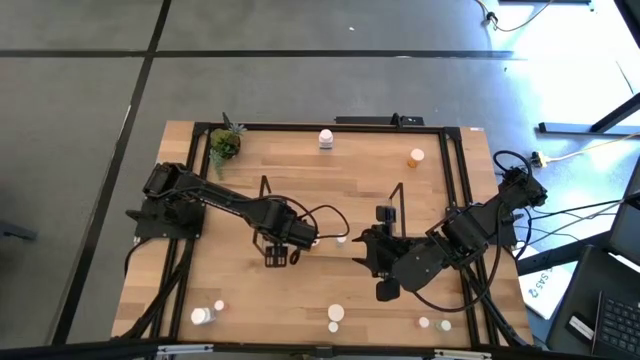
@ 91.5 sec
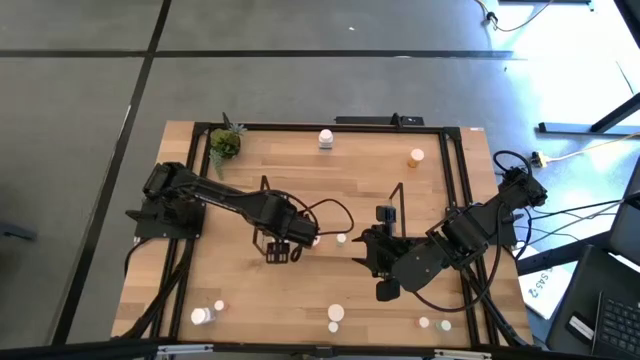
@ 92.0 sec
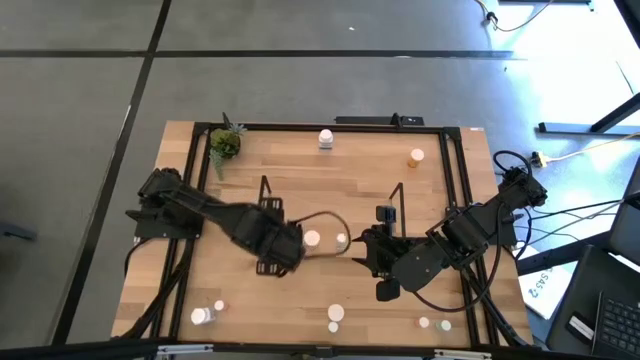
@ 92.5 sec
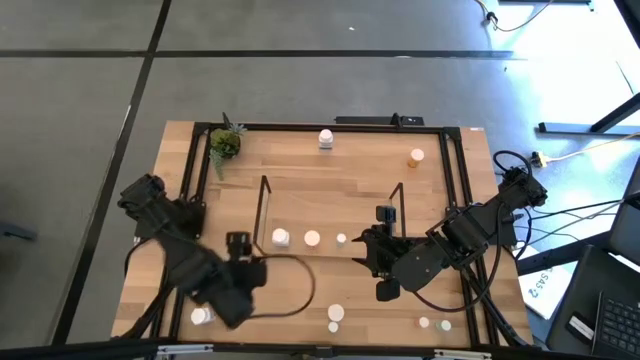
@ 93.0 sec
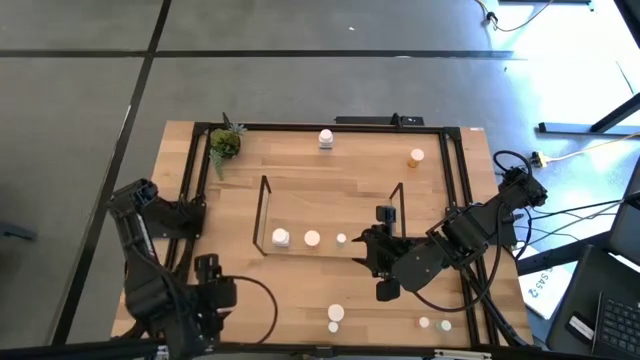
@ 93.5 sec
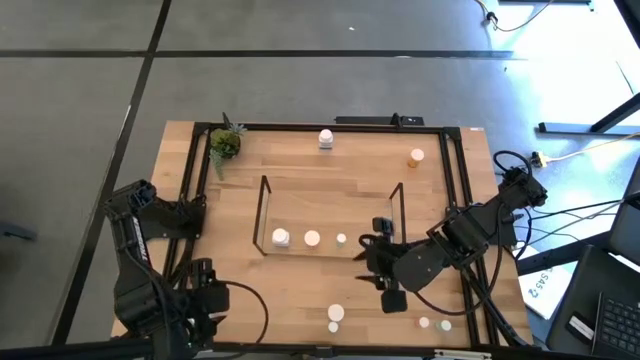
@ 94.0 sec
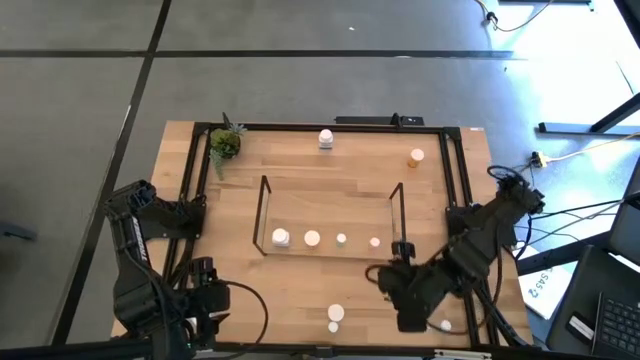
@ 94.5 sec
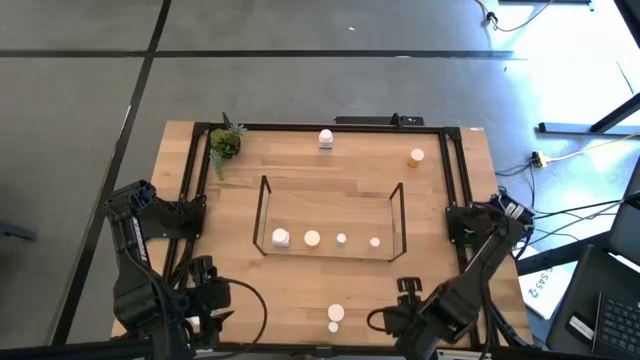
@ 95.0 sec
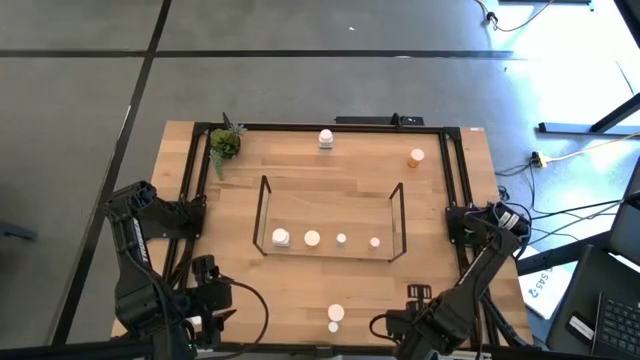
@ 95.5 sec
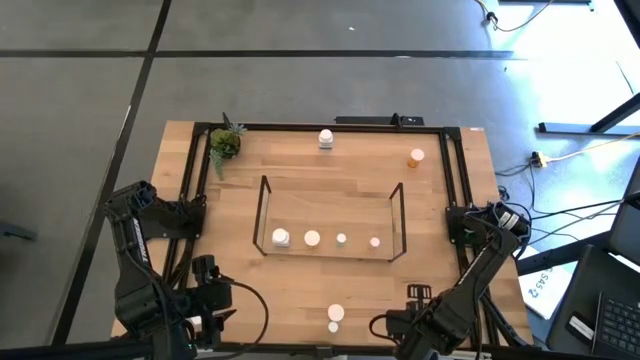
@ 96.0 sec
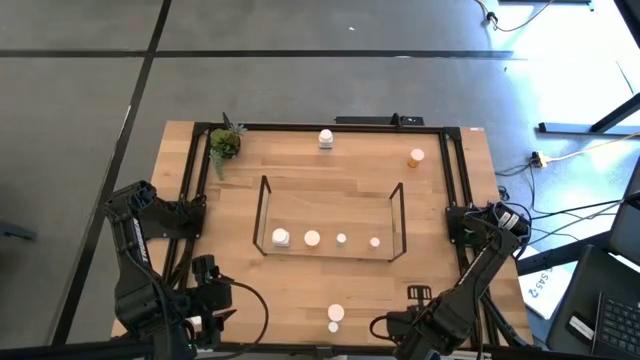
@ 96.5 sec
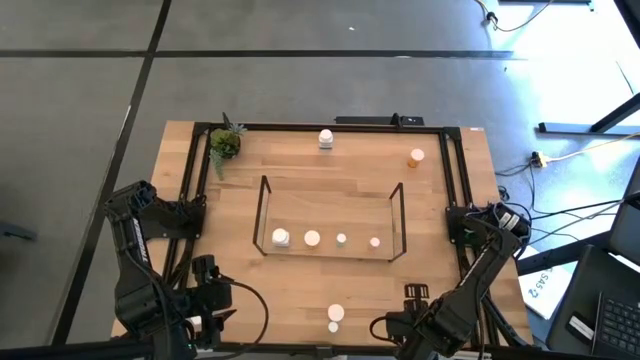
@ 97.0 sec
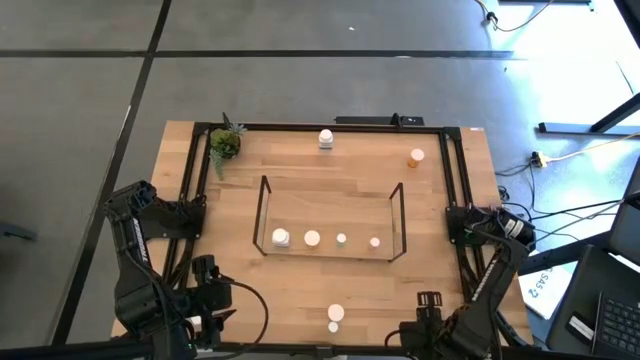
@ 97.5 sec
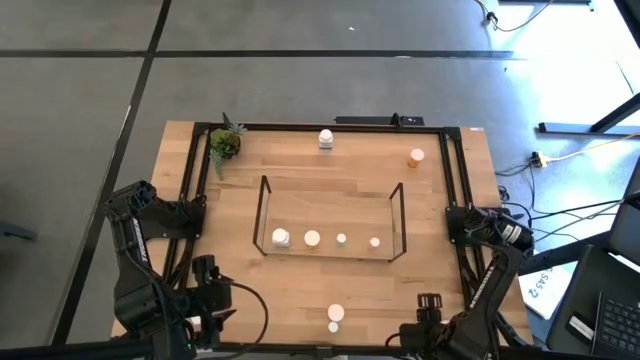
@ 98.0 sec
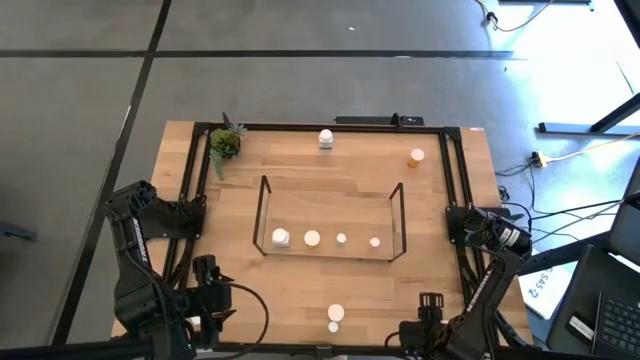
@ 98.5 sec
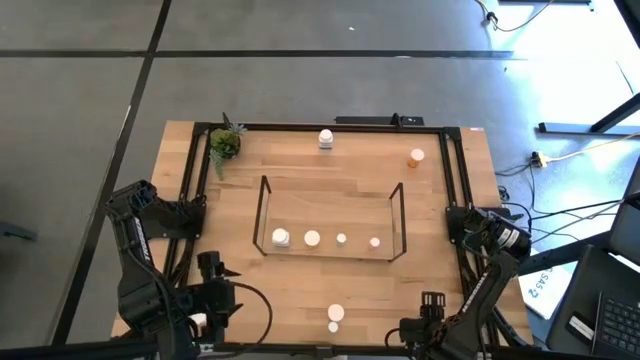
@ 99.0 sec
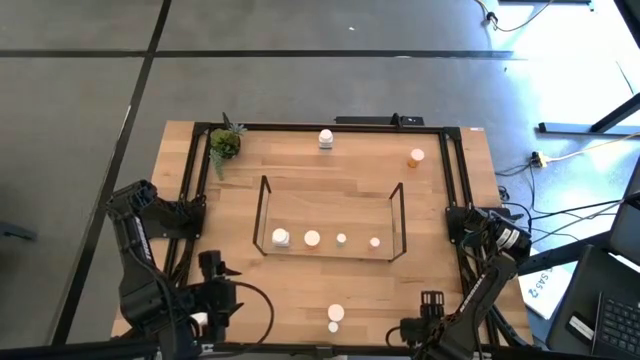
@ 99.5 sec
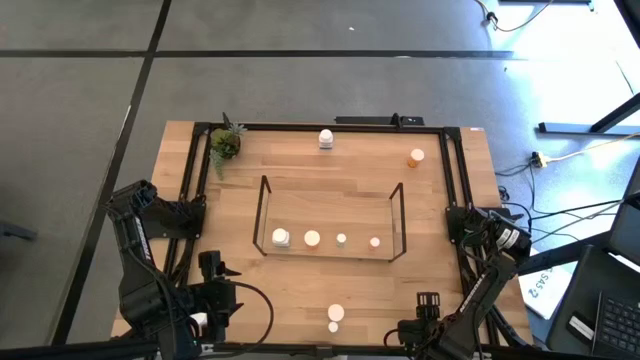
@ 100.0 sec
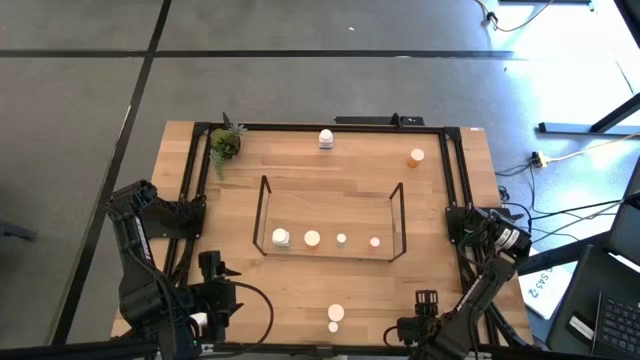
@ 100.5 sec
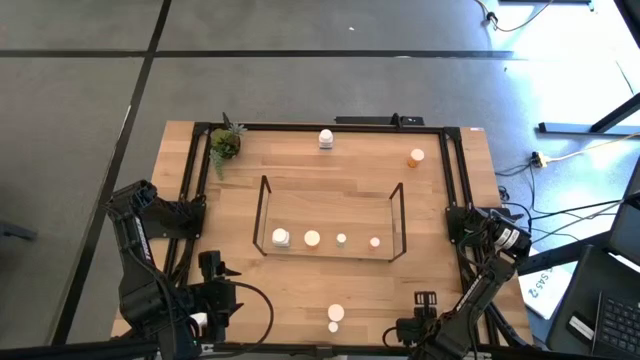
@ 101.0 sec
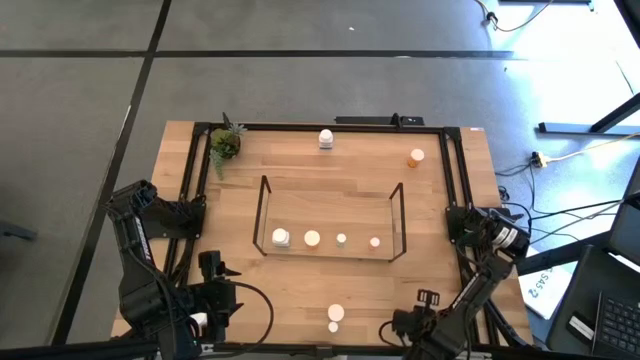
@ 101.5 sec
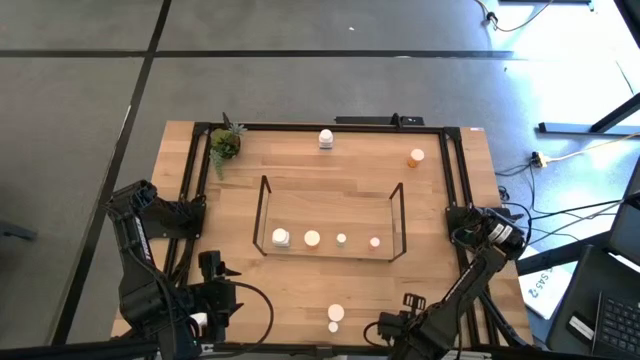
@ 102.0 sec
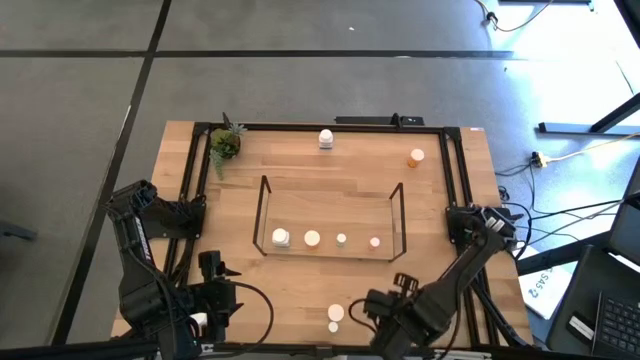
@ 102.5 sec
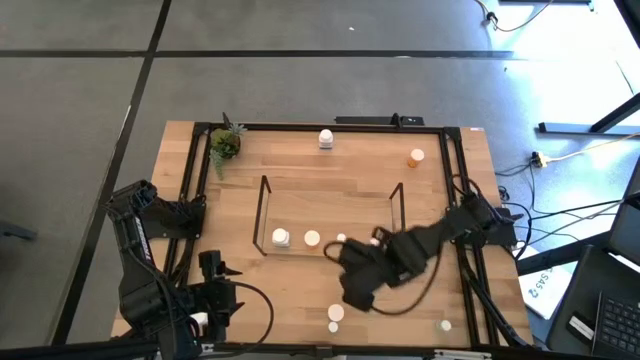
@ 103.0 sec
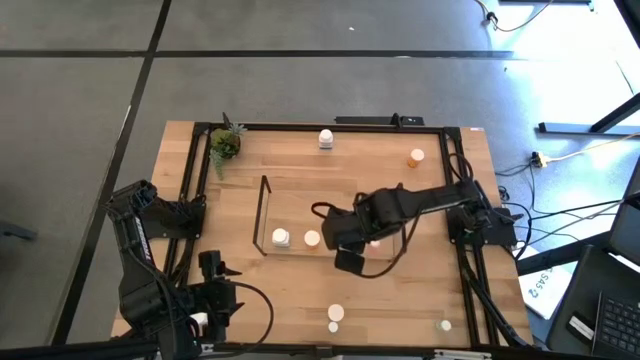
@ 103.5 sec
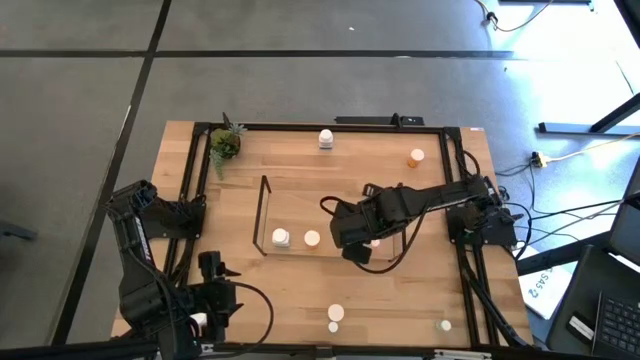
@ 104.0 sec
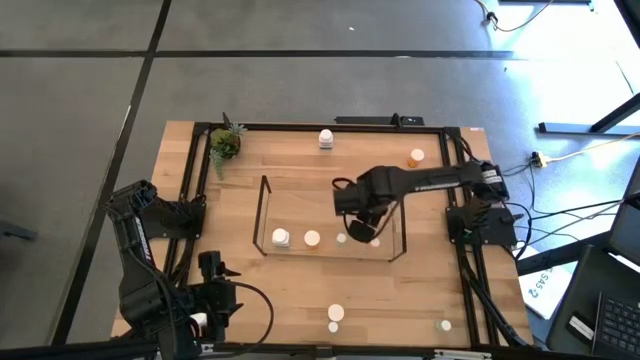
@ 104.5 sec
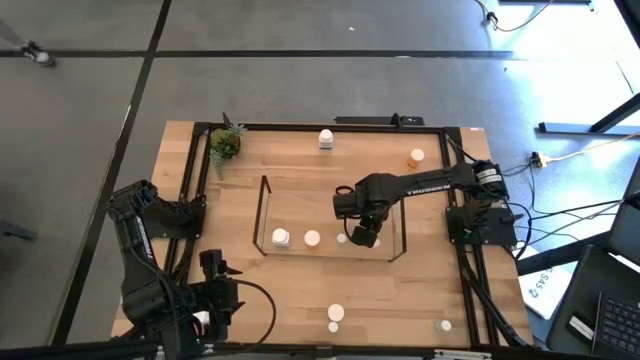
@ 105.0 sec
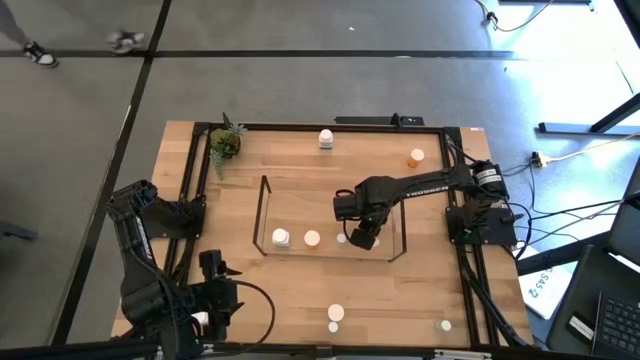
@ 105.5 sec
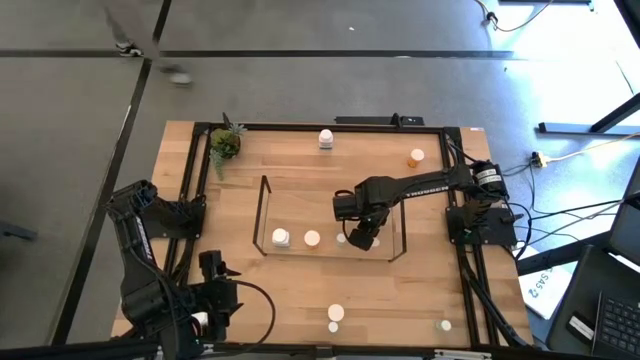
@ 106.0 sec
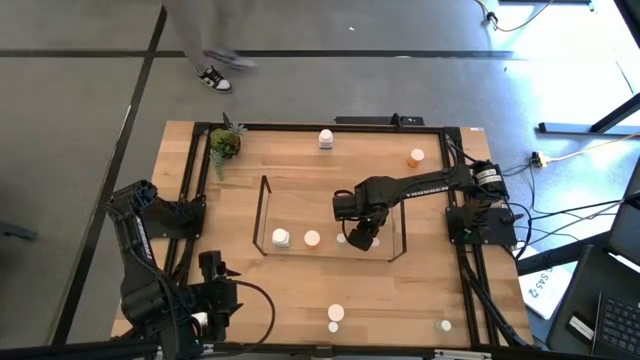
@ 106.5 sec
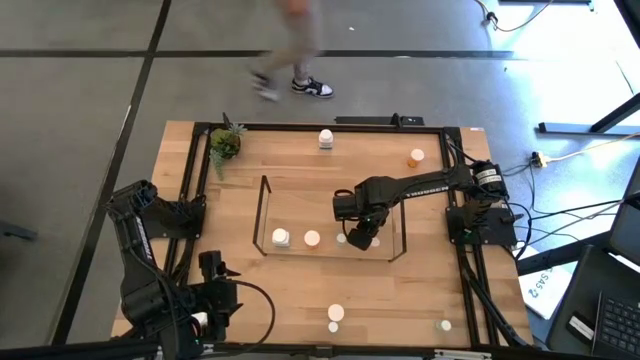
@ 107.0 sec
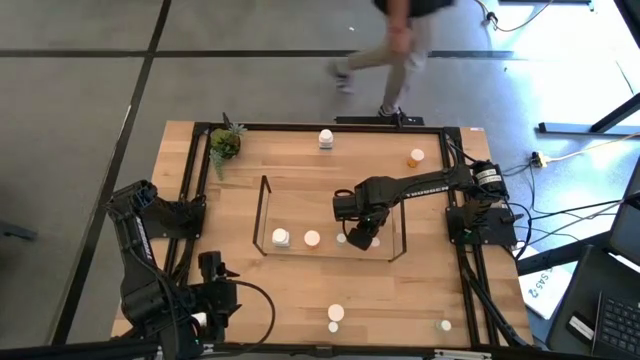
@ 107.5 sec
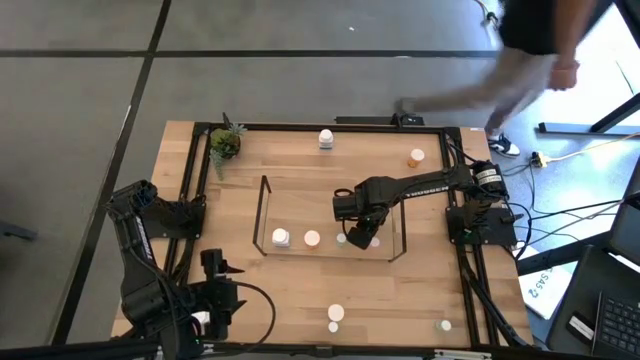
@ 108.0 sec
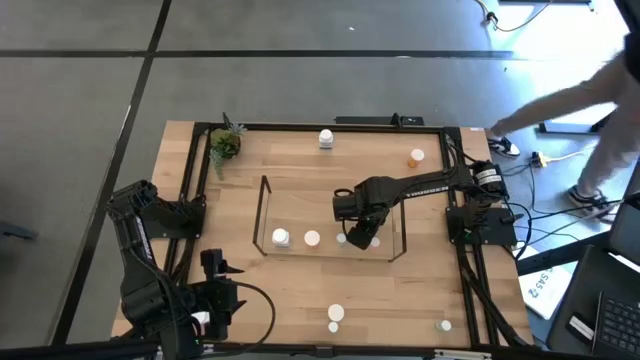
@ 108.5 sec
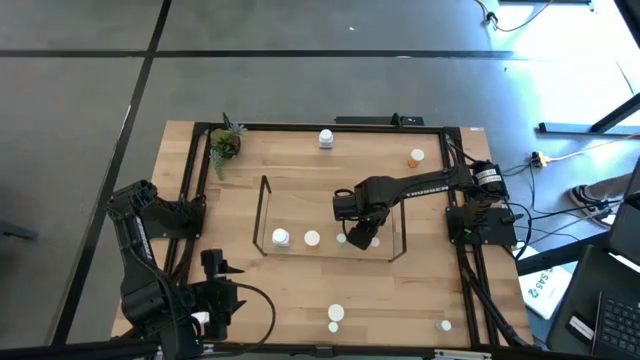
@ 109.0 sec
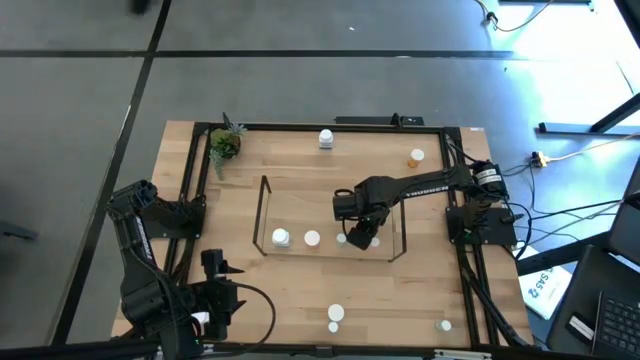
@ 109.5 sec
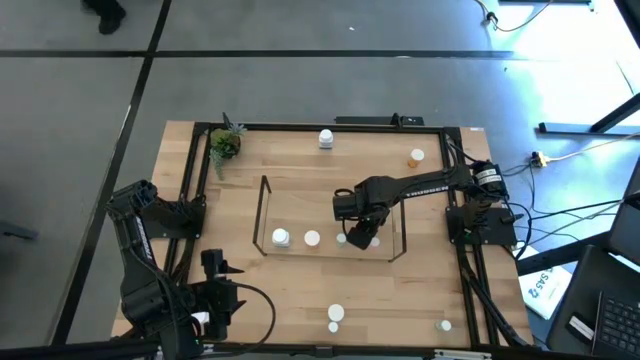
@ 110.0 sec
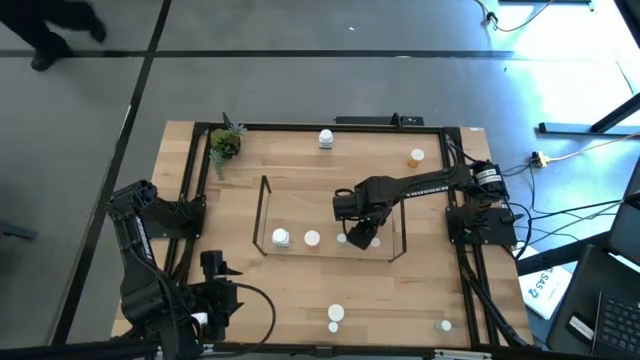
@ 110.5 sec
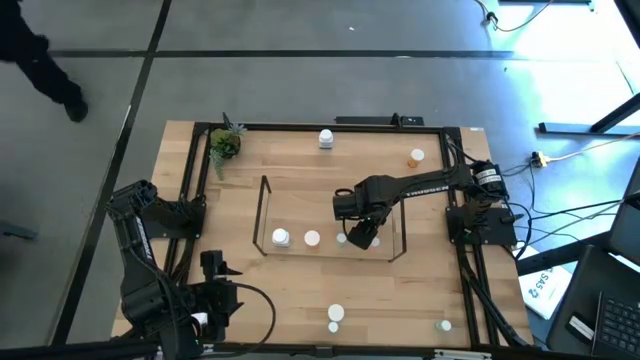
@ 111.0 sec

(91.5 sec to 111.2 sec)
Task: Pick and place medicine bottles onto shelf by color
Put the bottom right pink pill bottle on the shelf aligned with the other pink pill bottle

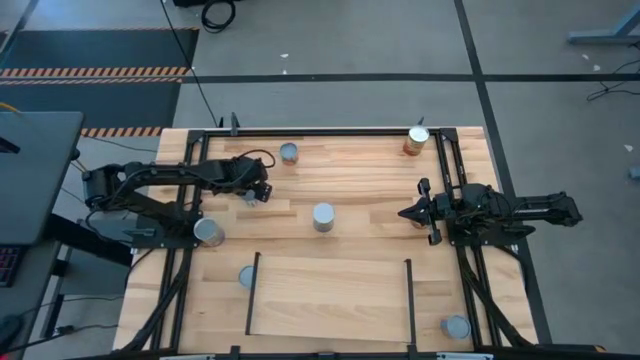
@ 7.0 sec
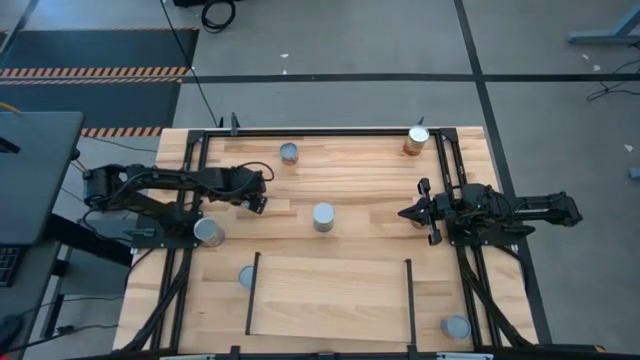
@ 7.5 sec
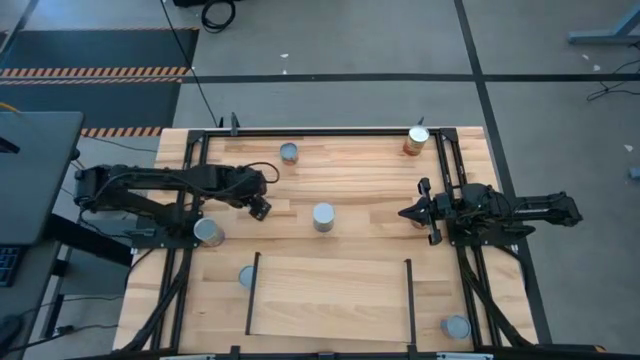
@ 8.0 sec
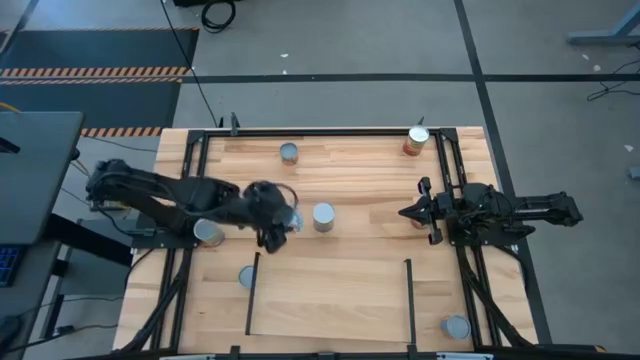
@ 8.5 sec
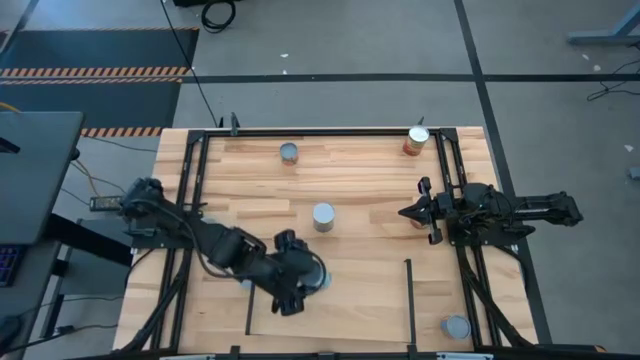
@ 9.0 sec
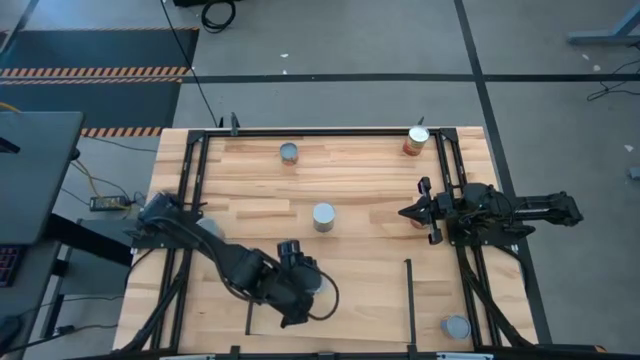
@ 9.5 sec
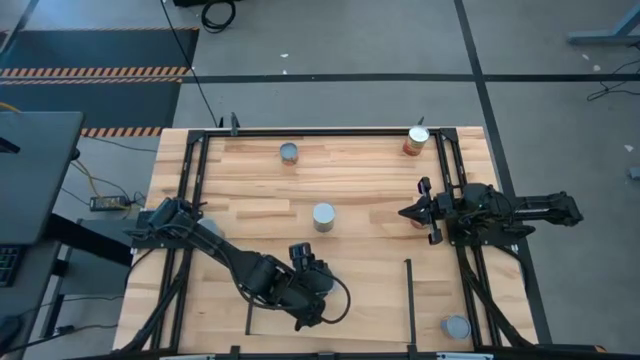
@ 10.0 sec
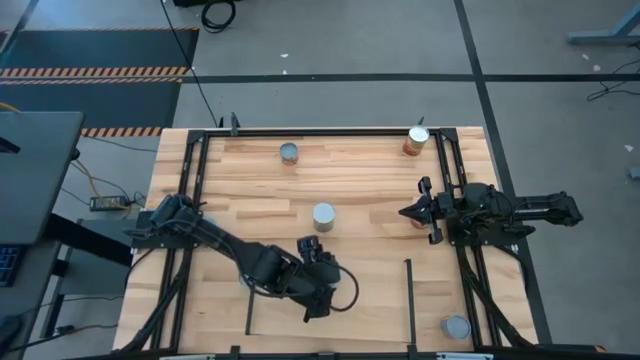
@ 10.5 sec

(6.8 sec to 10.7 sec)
Task: Pick and place cans onto a shelf
Put the canned carrot on the shelf
